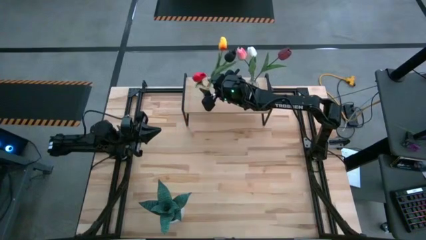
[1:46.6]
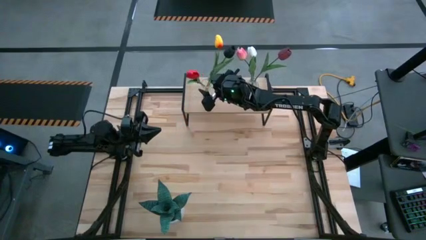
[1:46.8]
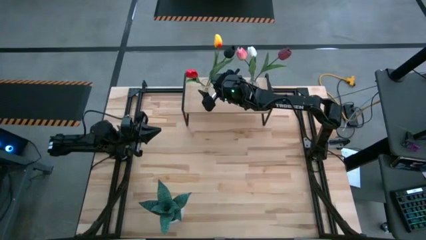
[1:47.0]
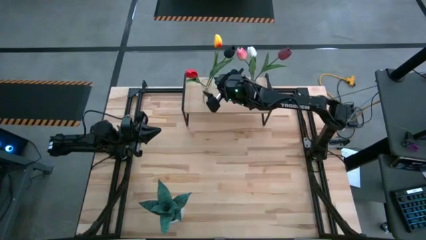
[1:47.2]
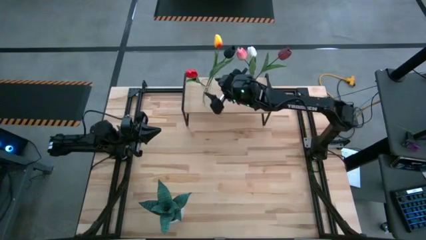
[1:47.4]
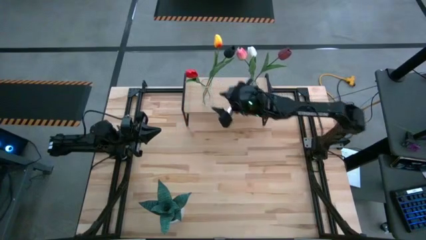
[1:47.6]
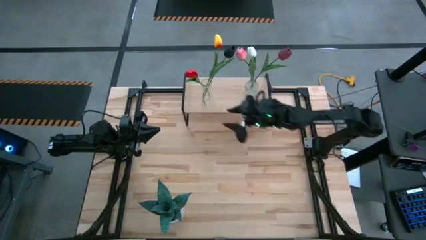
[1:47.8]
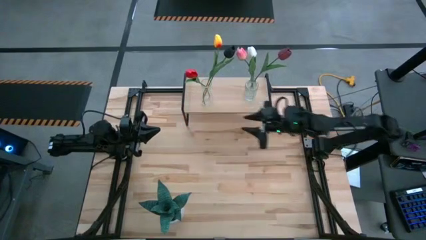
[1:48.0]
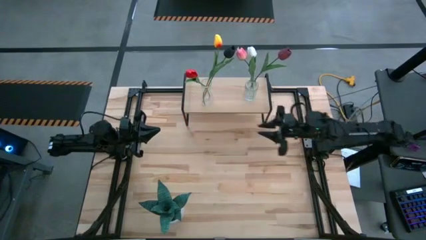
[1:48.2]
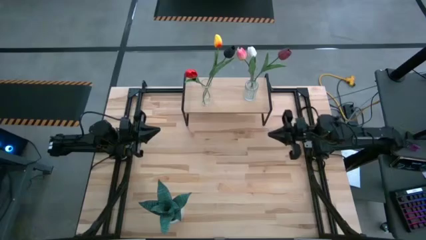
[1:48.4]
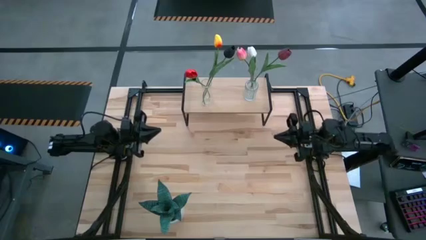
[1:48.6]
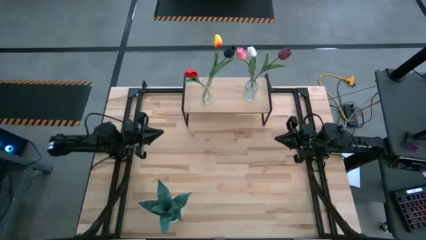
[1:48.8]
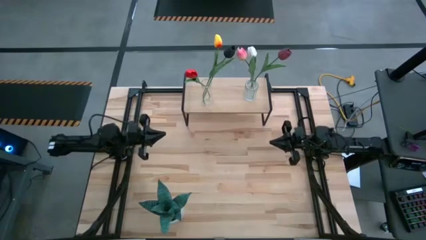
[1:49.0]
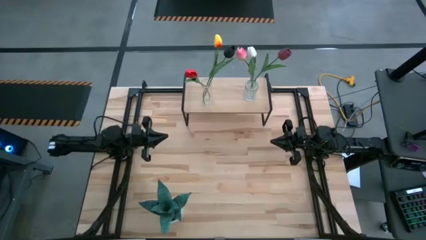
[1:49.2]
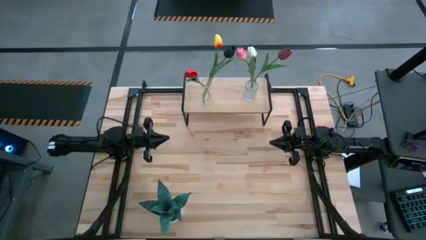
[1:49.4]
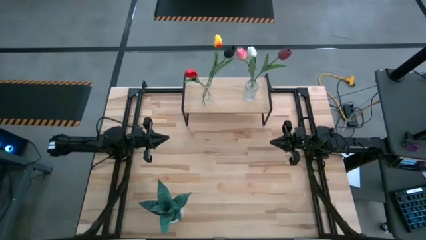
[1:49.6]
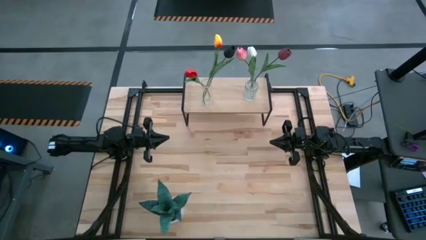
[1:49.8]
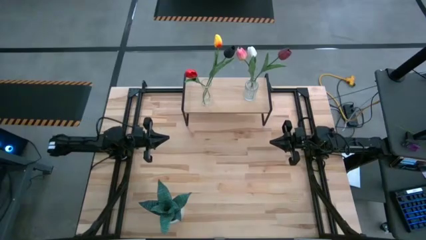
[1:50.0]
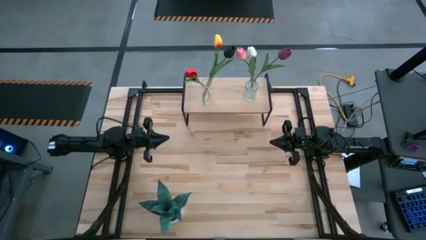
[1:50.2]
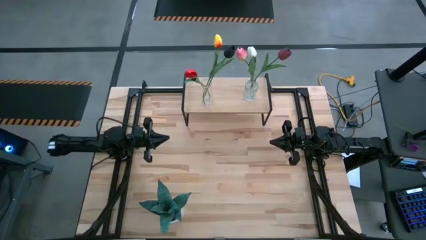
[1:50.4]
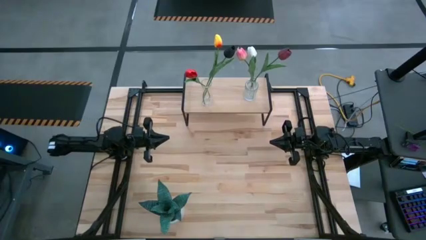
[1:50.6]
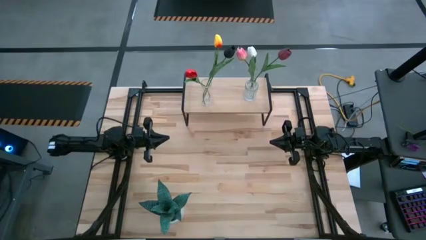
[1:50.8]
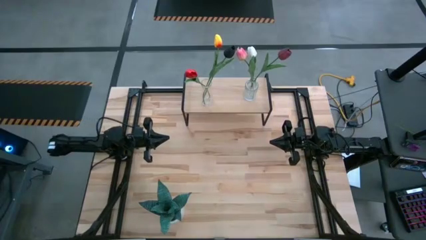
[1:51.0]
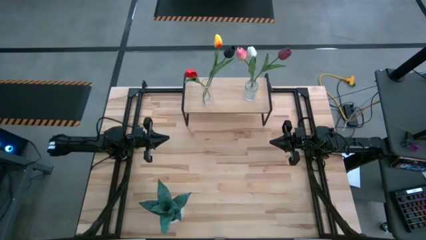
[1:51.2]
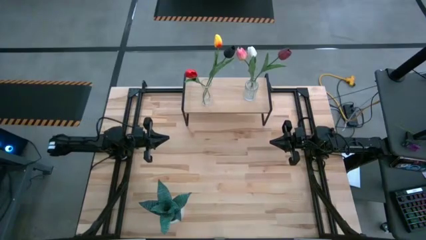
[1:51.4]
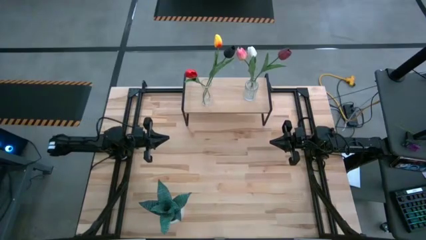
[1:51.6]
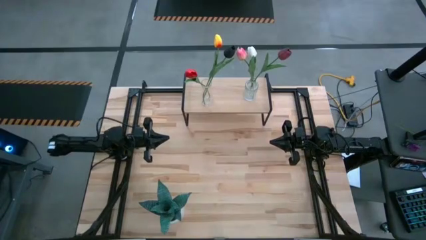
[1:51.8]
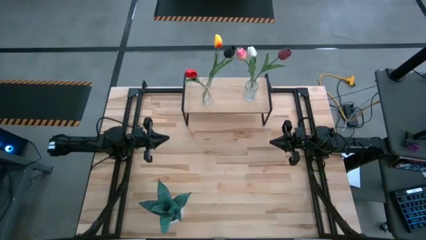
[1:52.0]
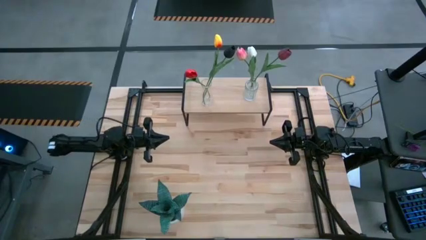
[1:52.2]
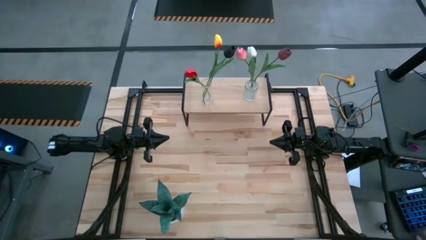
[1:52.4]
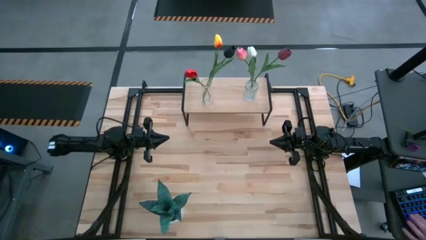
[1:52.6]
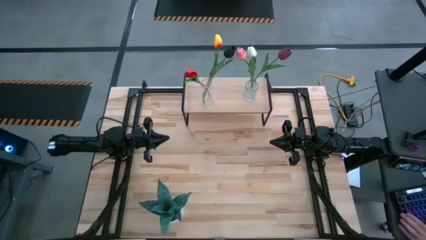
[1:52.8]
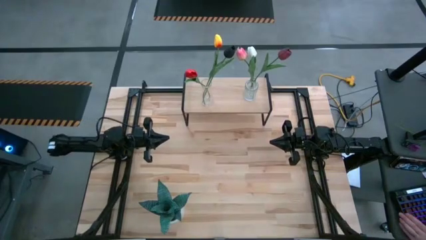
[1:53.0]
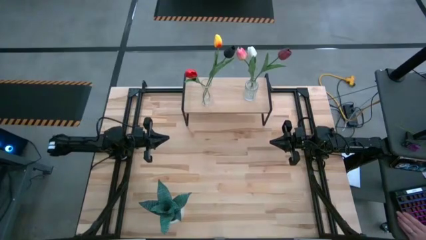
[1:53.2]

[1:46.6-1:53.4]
Task: Pick and place flowers into a vace then onto a shelf
Return to Home Position

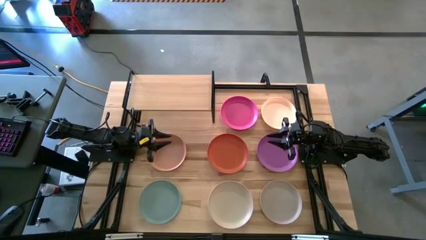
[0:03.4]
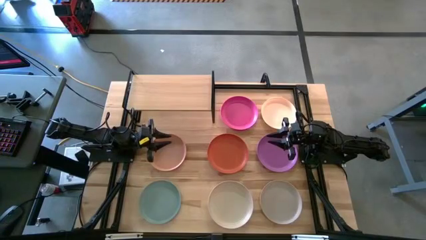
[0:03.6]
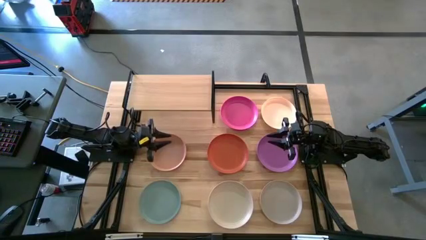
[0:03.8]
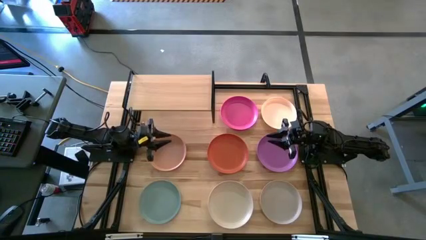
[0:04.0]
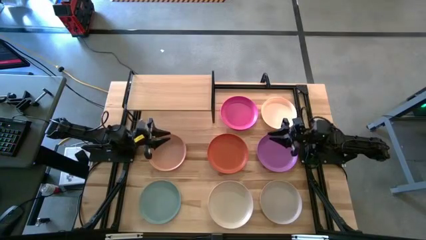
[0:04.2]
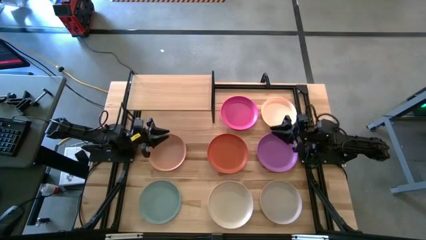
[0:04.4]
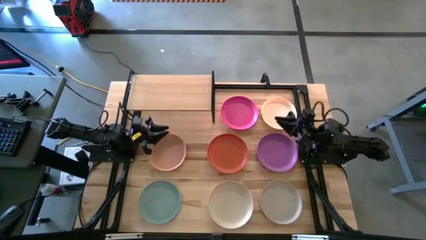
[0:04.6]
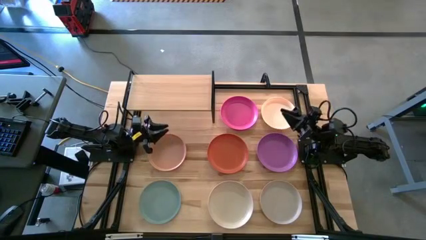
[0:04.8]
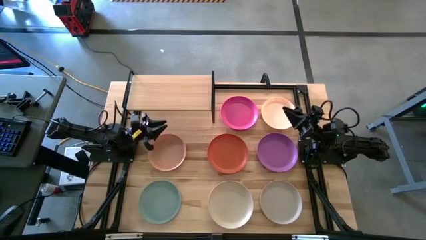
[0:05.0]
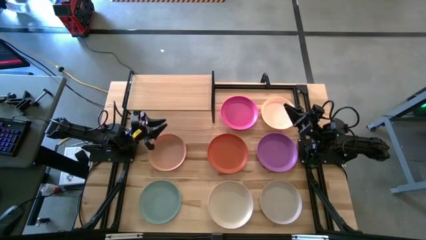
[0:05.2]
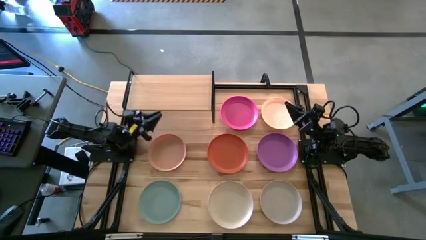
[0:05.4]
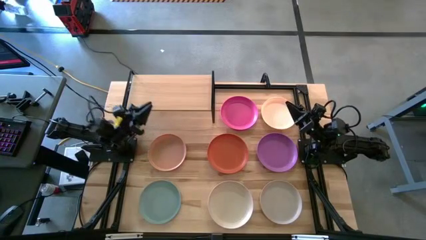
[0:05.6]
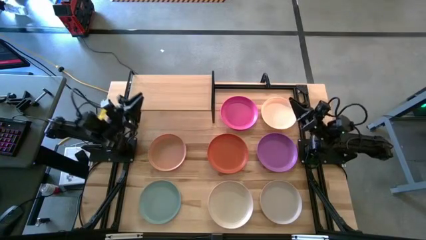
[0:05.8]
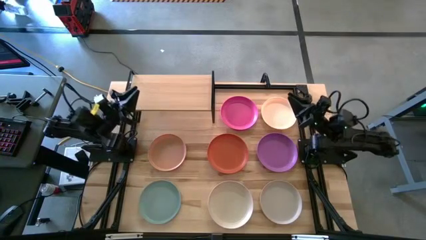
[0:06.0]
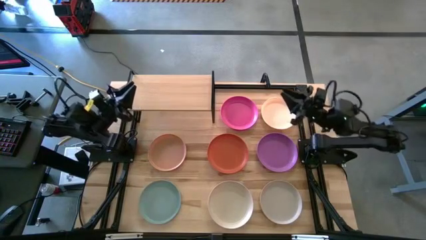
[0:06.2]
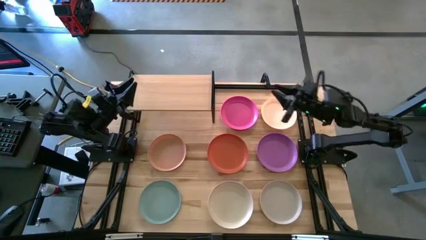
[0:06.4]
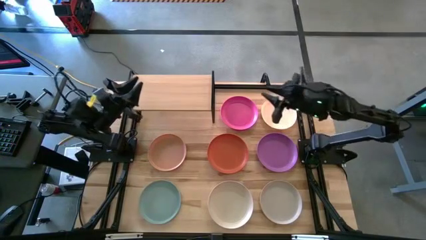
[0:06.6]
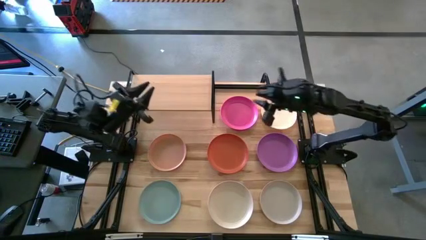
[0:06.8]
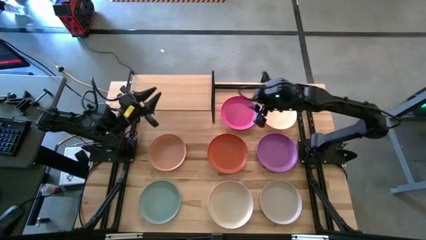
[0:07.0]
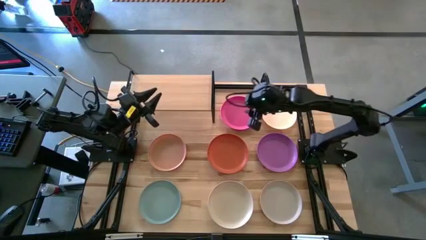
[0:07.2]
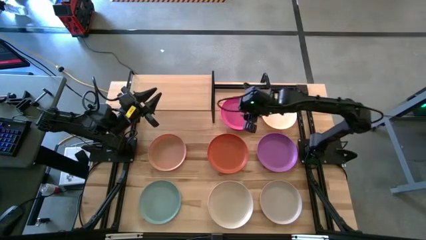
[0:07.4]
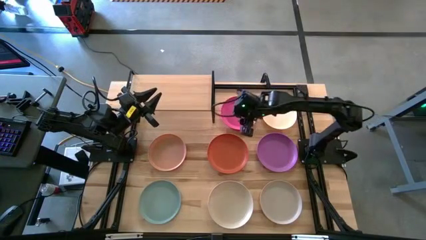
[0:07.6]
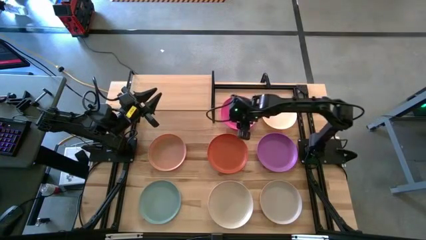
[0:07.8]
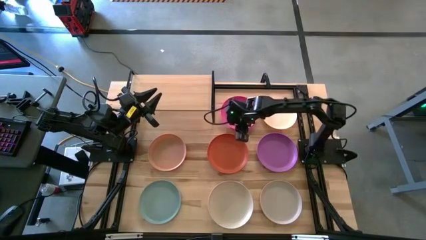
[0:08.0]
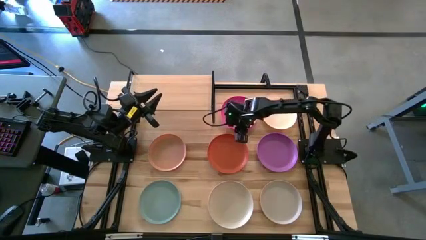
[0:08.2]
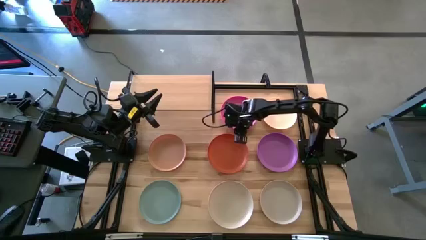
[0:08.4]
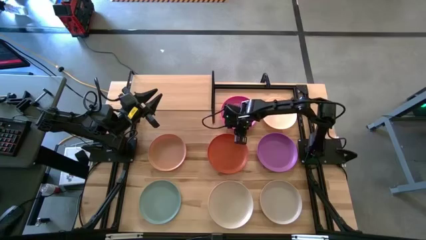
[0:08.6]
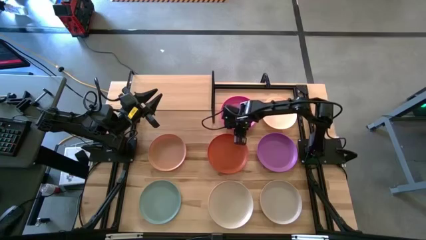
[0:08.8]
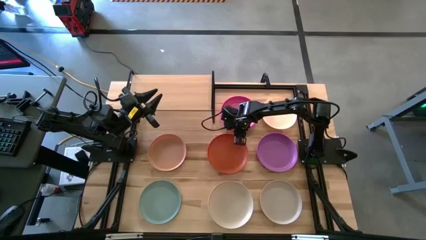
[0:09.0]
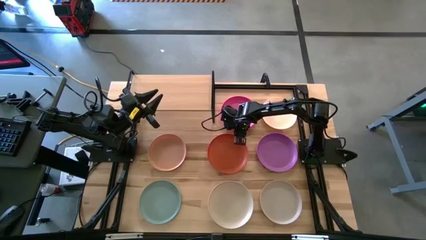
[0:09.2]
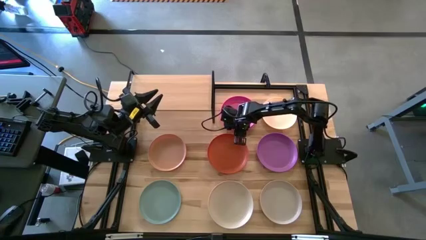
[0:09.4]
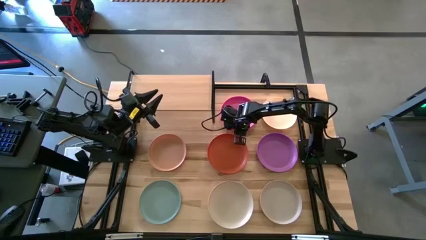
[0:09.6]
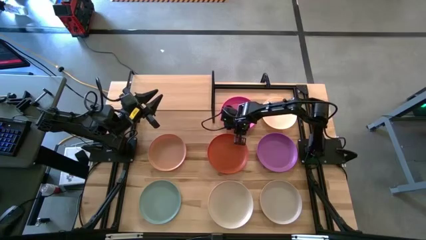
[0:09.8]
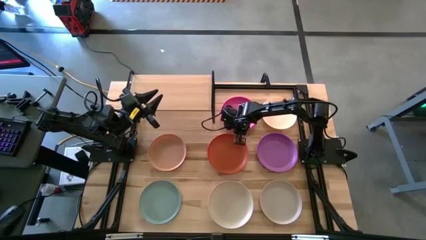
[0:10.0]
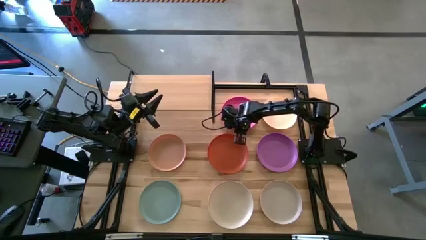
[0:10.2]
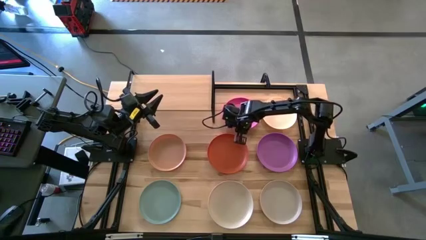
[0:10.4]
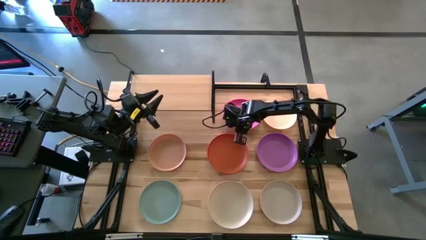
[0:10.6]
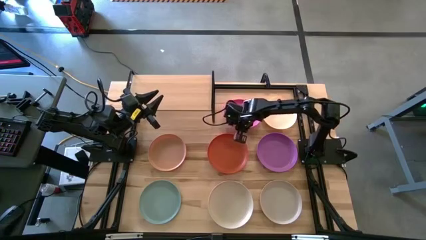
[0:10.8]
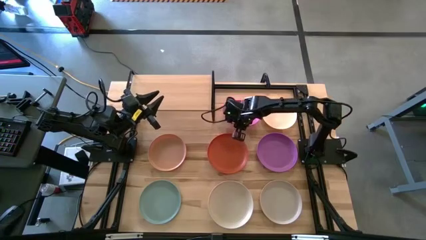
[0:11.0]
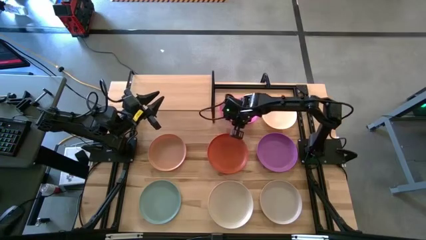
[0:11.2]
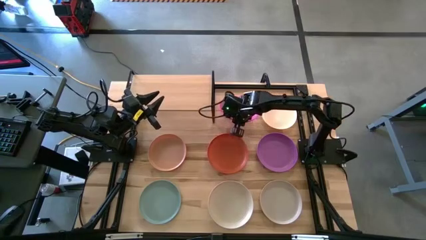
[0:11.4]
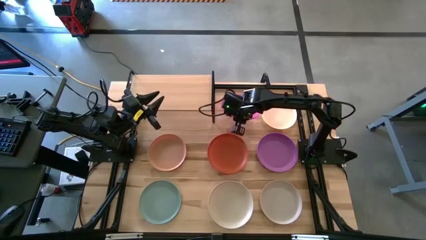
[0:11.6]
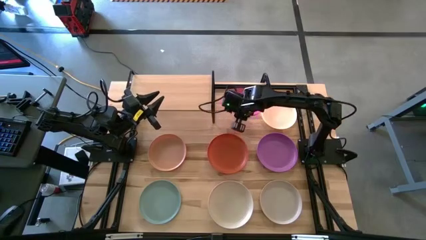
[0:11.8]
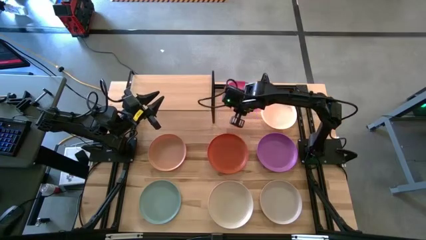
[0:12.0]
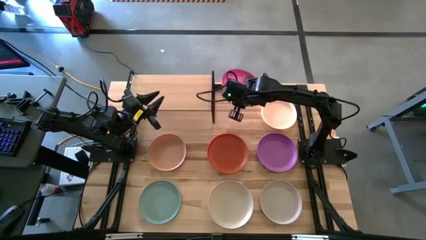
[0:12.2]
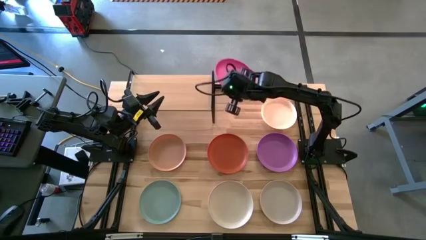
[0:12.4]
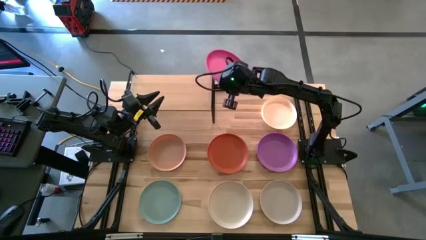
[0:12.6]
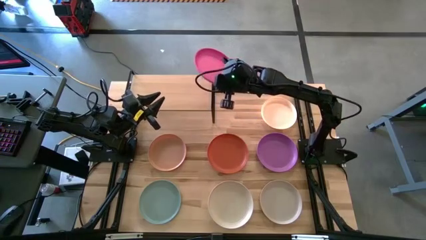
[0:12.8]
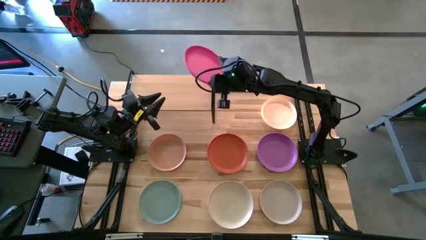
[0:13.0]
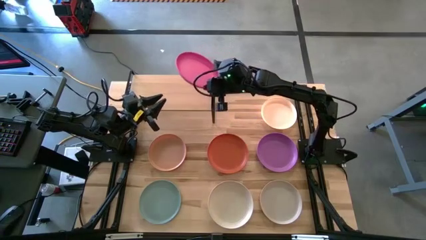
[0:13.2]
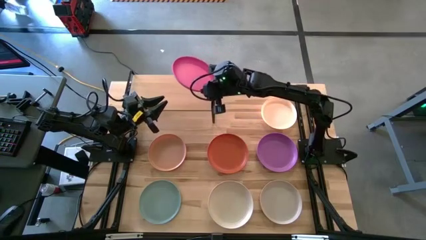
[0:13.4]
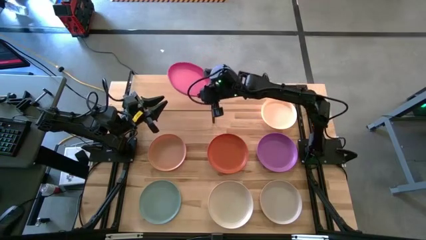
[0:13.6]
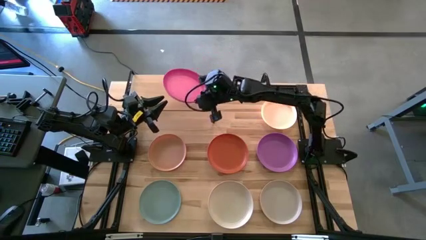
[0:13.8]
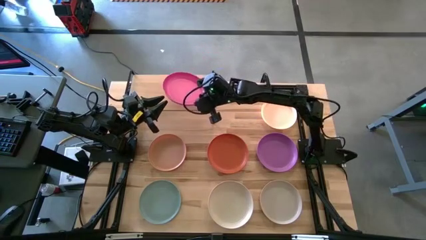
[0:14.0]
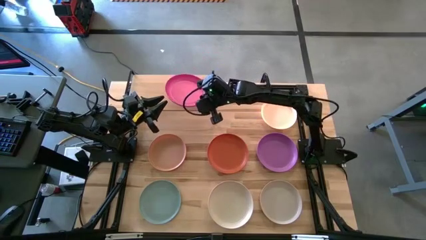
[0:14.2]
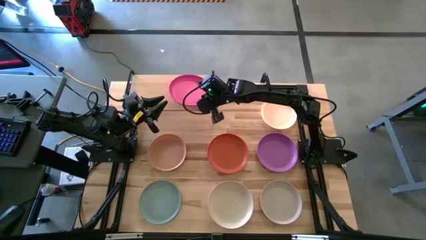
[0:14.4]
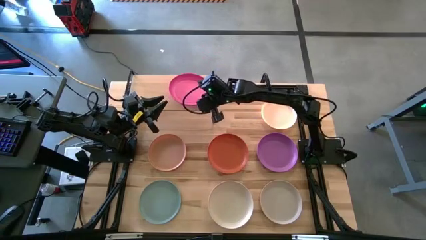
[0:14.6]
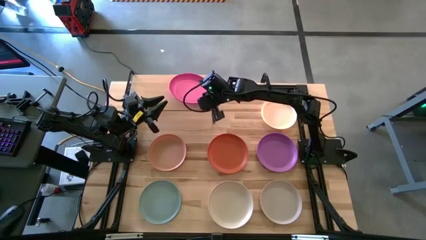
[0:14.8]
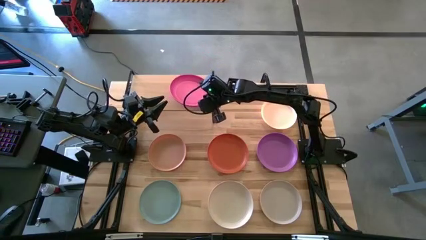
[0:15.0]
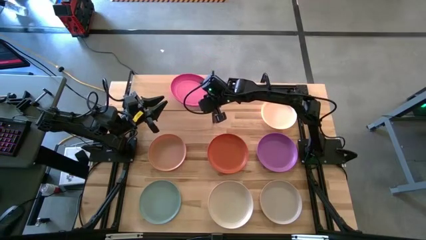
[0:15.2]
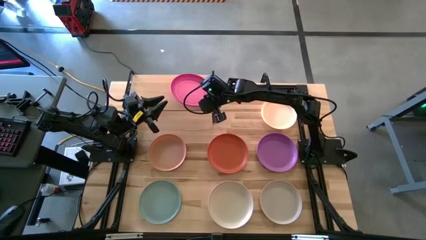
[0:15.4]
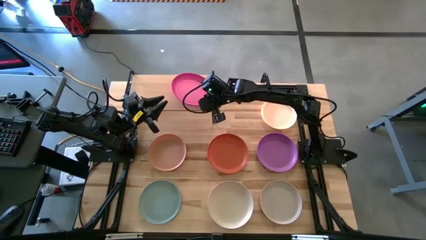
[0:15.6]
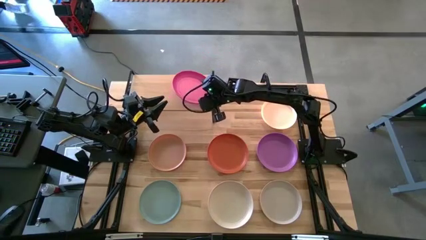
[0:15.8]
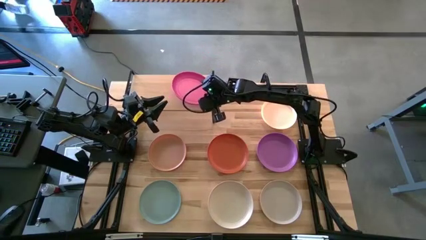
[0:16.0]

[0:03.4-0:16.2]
Task: Place and stack plates onto a shelf
Put the pink plate on the shelf
